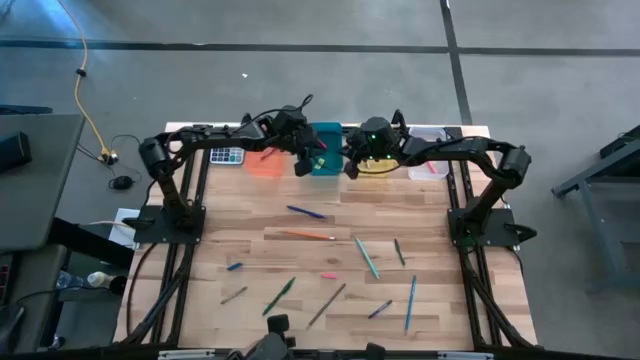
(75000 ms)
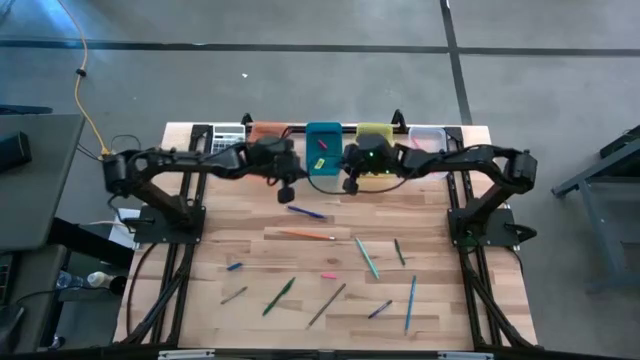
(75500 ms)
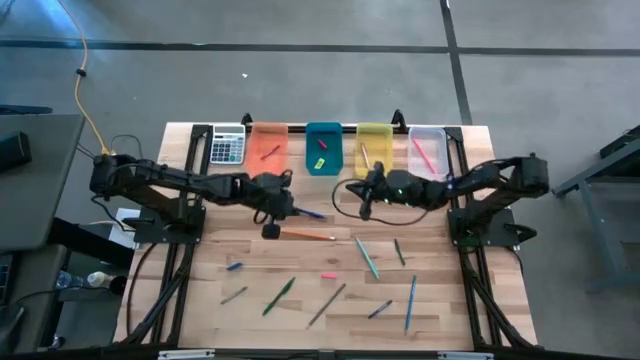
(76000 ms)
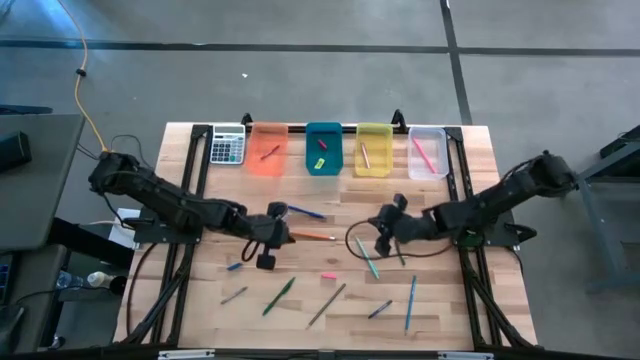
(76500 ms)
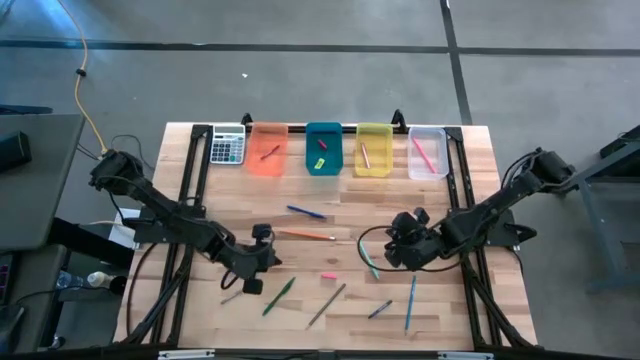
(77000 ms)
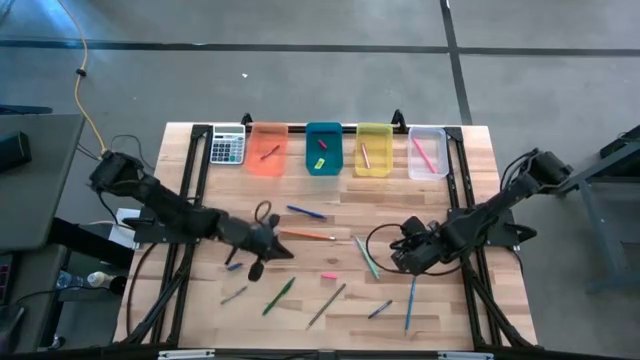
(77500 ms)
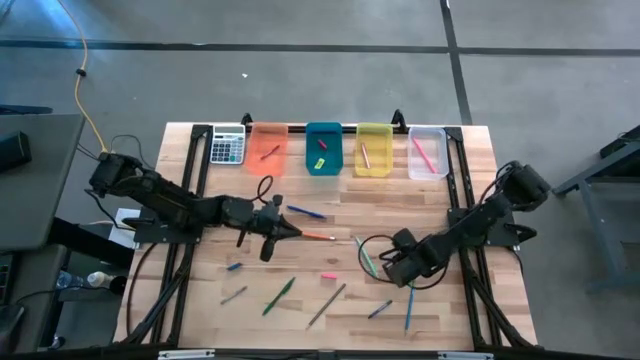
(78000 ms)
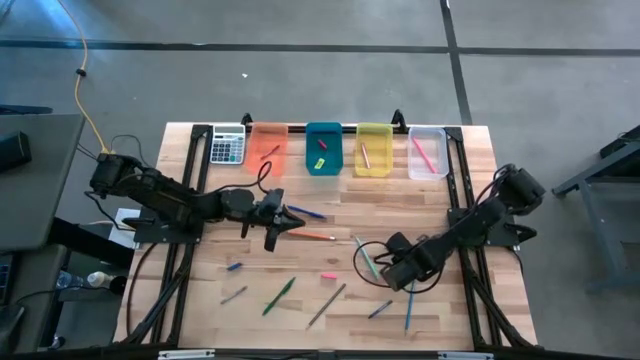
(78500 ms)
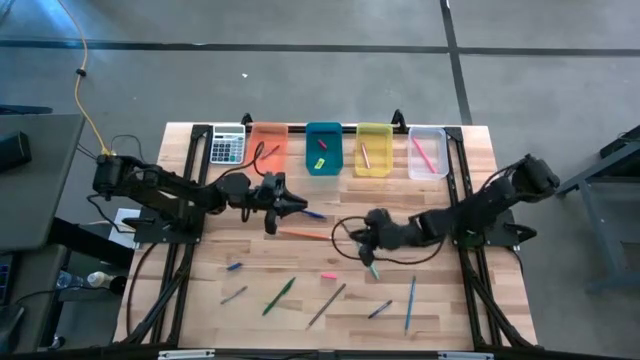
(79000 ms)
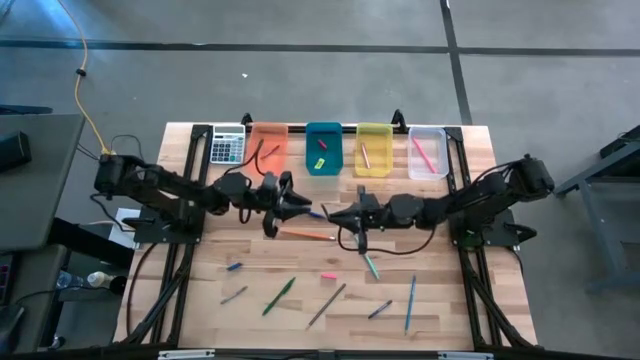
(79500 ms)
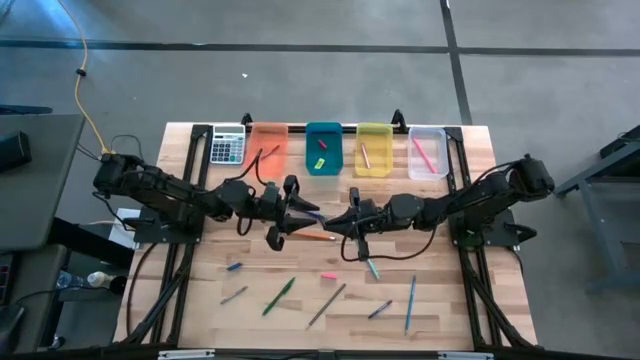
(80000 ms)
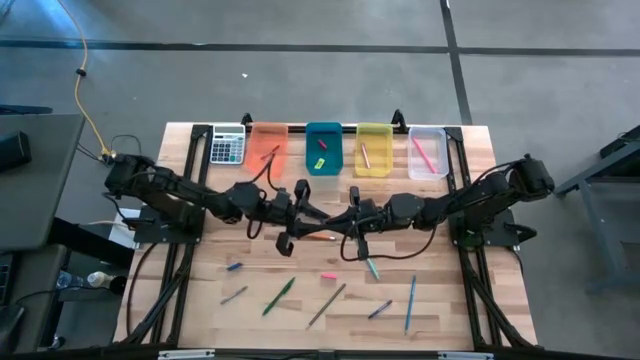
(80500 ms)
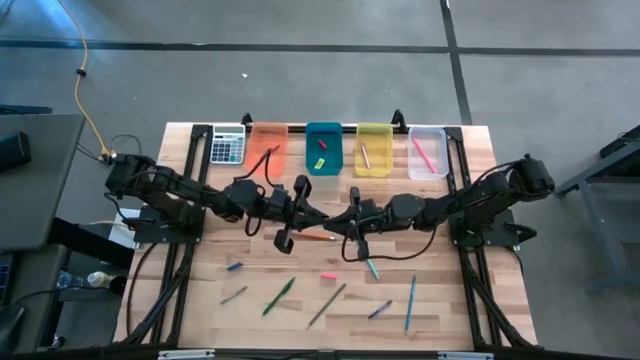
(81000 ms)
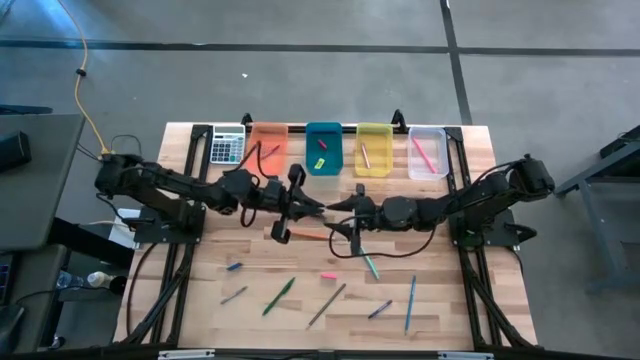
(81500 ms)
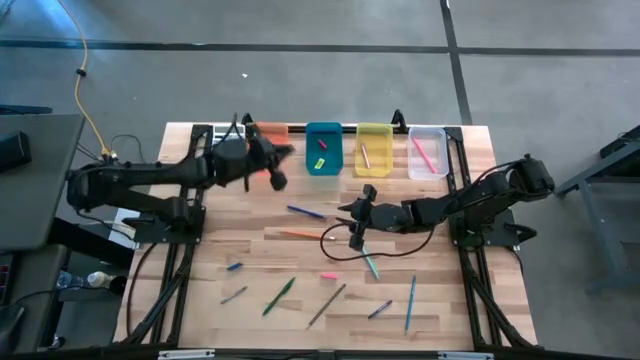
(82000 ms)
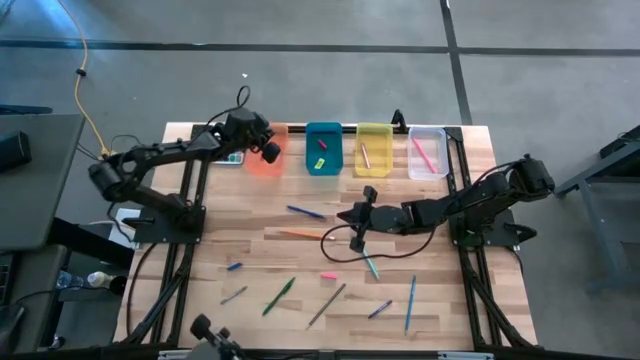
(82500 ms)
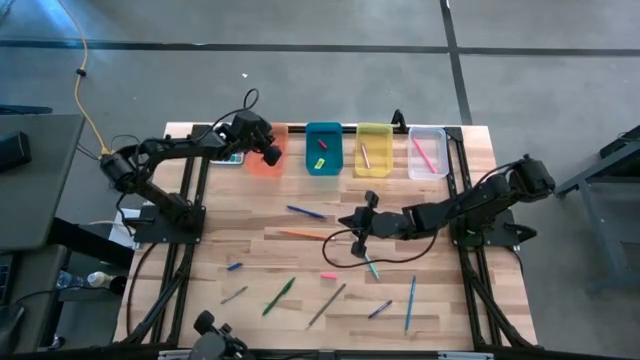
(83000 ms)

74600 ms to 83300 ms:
Task: Sort crayons/erasers/pens/pencils in bins
Put the green crayon into the orange bin

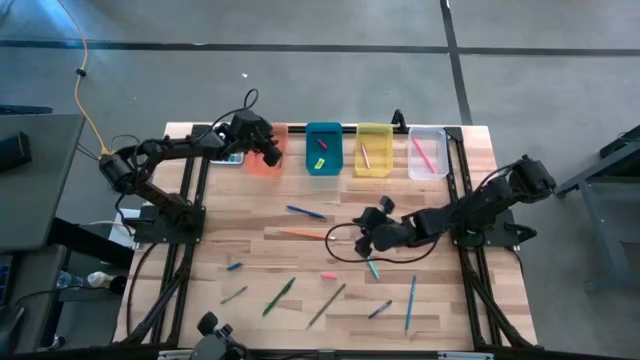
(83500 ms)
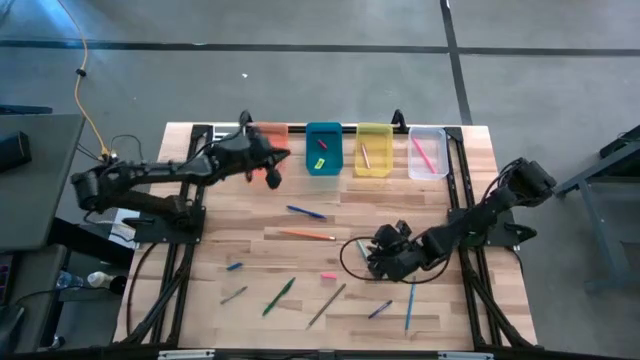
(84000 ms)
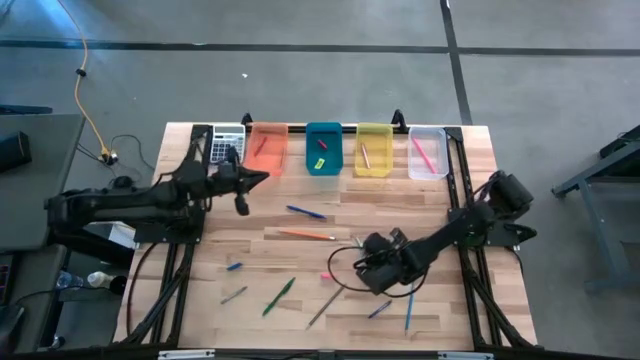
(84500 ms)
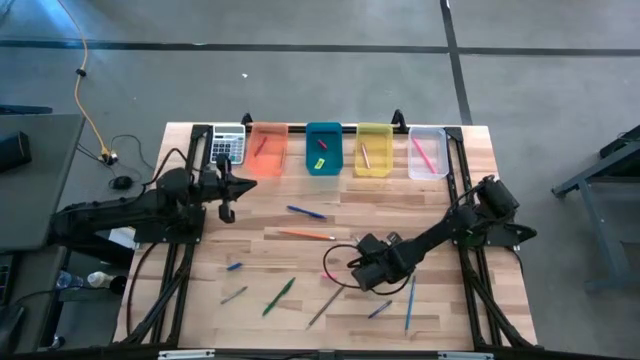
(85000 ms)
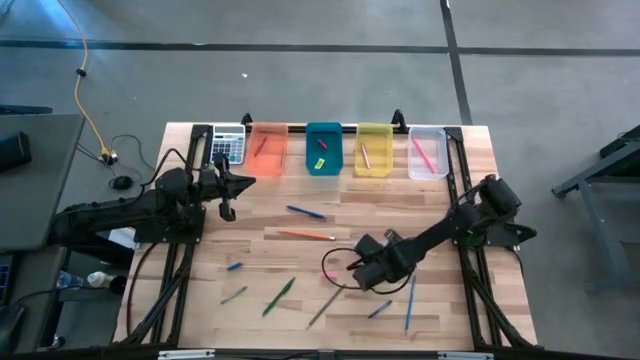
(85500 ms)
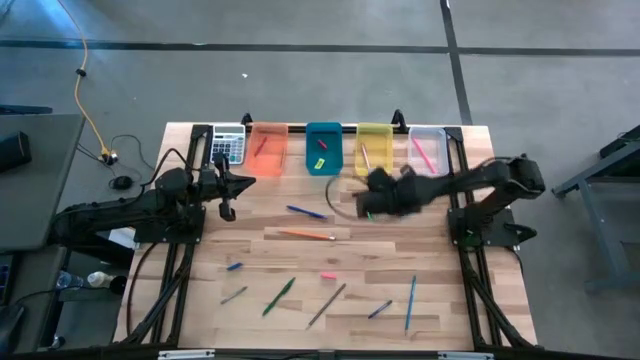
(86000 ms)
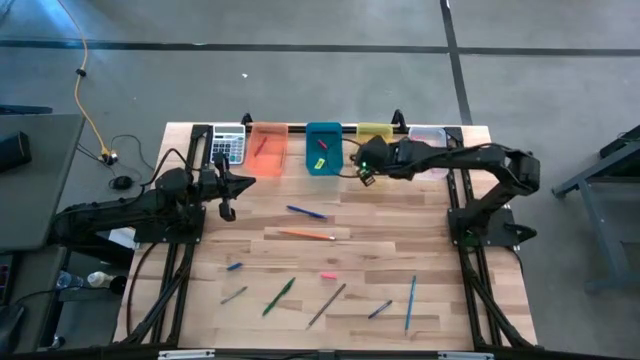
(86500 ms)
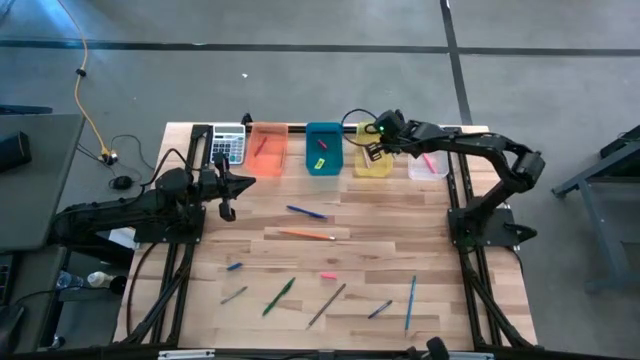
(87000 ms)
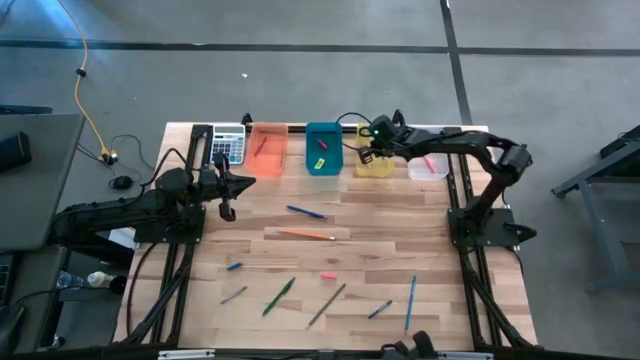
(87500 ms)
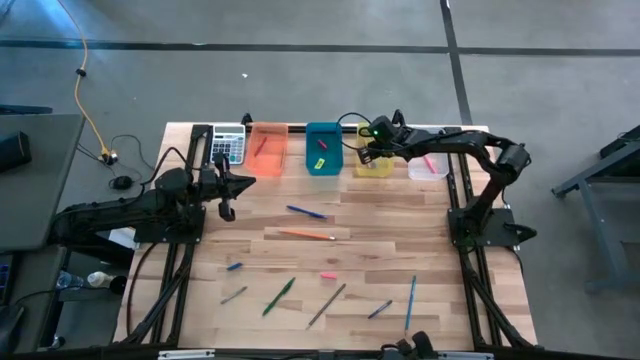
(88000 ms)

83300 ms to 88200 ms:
Put the light blue ballpen into the yellow bin

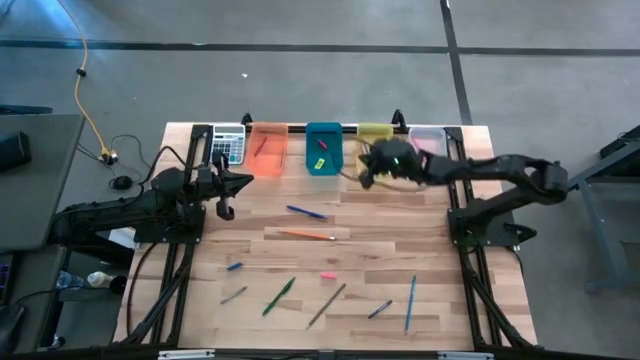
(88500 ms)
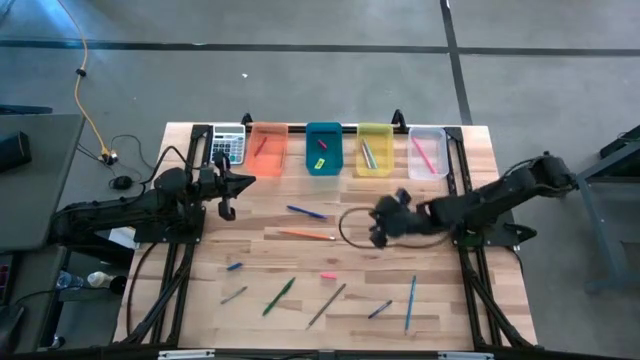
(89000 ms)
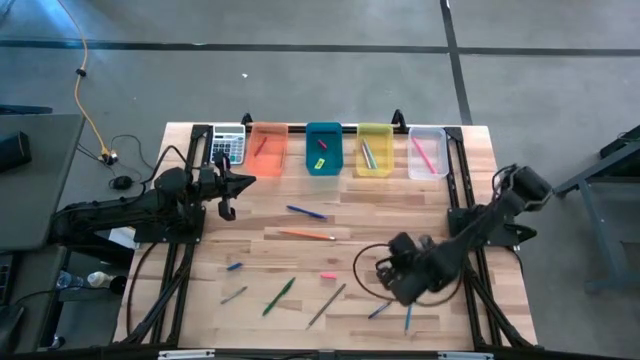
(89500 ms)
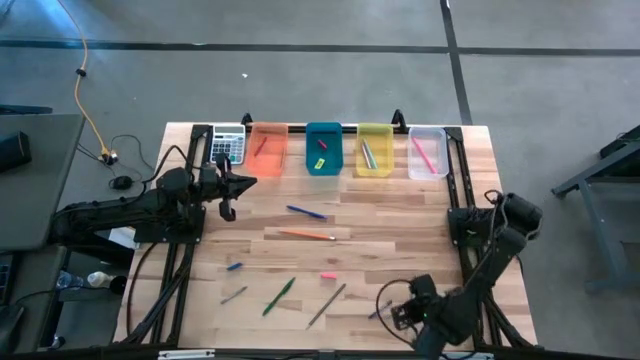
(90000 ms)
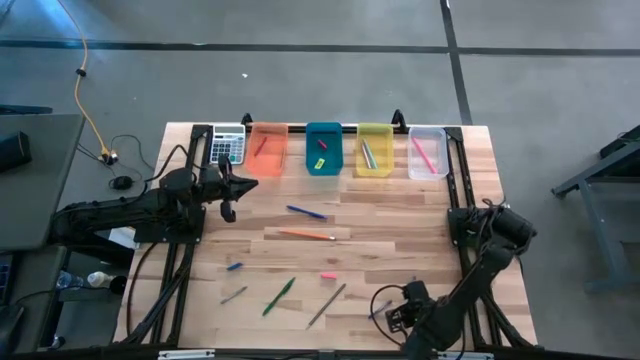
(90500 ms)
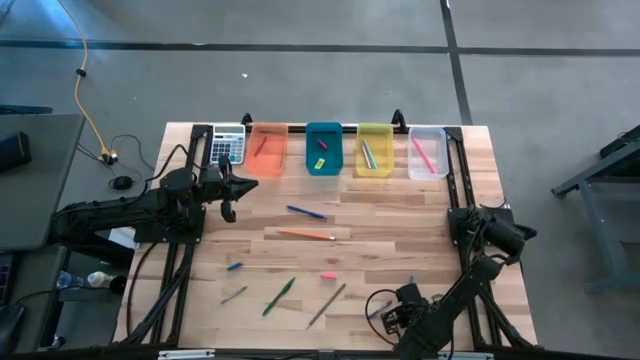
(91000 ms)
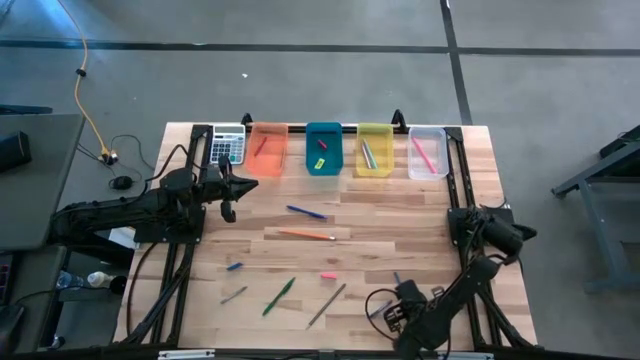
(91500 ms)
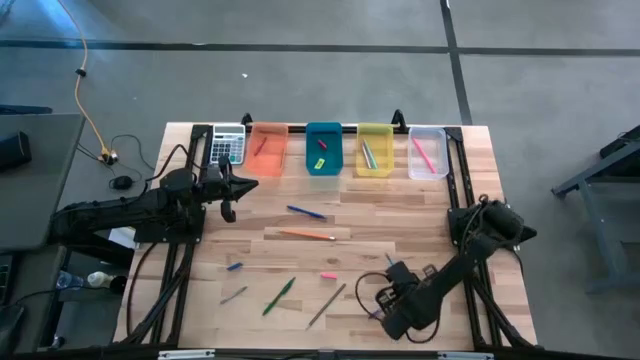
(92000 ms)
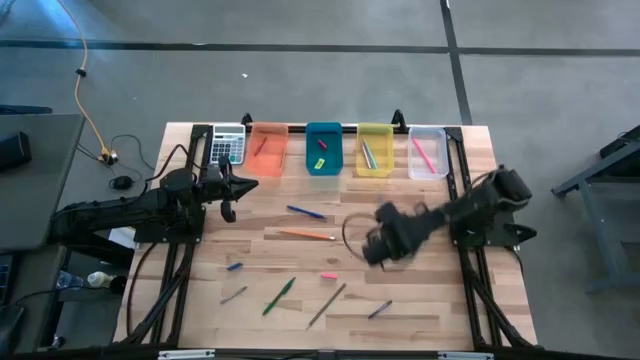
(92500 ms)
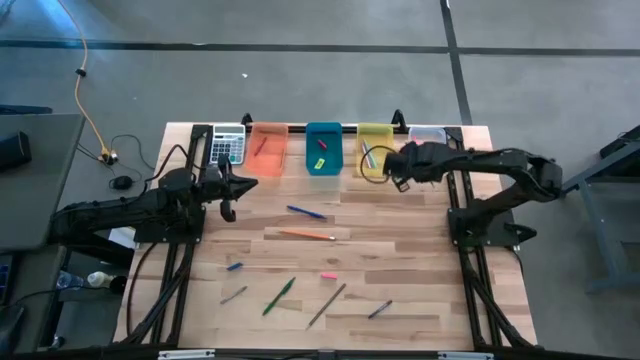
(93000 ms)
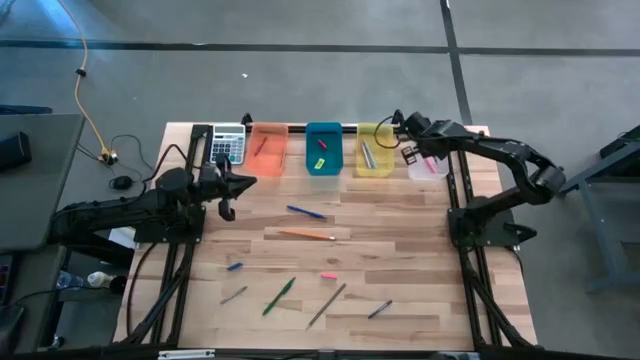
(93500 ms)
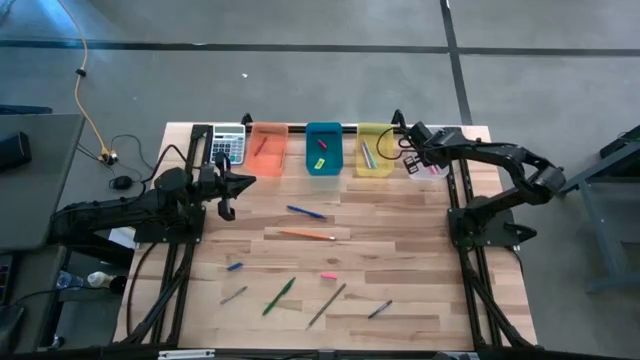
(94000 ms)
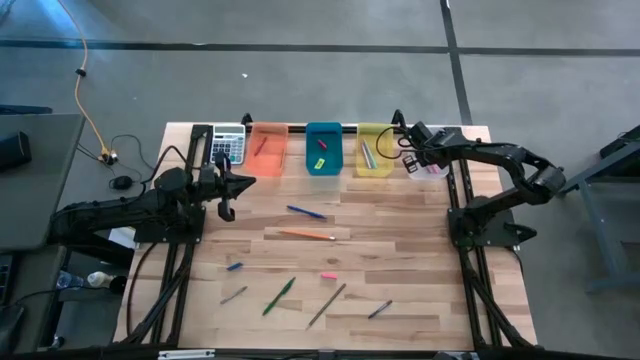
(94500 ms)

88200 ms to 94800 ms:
Put the blue pencil into the transparent bin

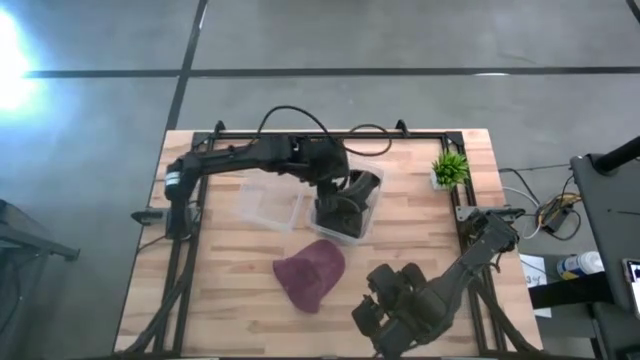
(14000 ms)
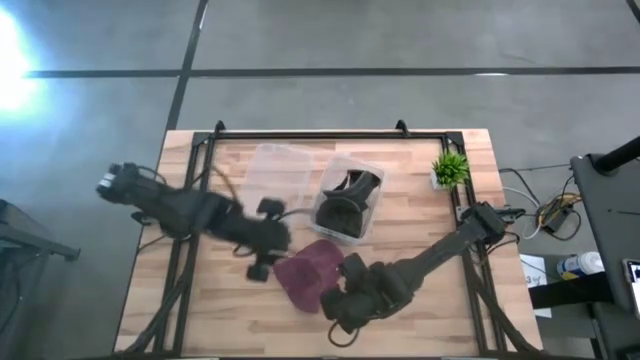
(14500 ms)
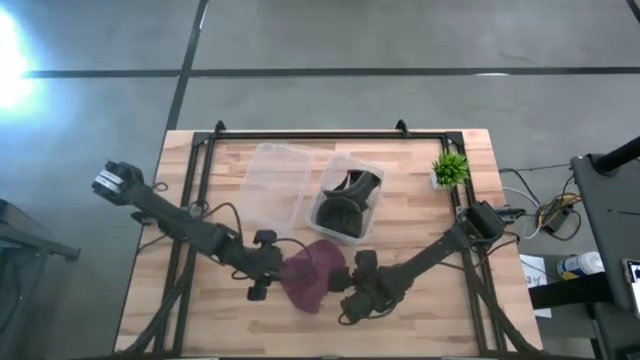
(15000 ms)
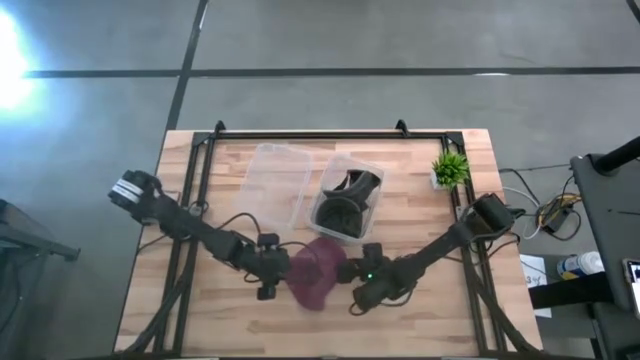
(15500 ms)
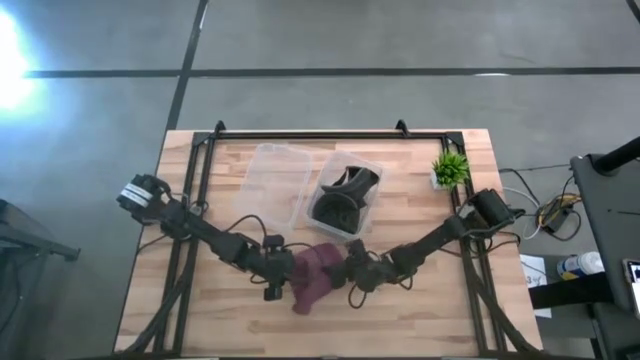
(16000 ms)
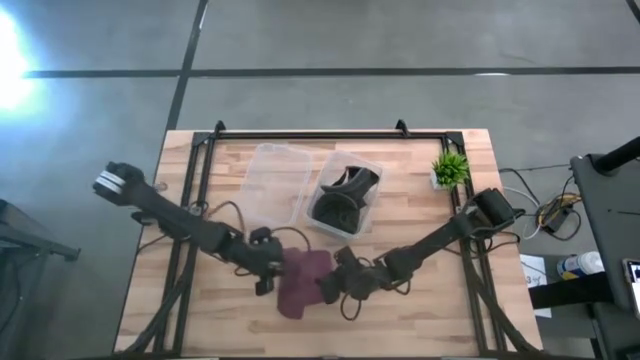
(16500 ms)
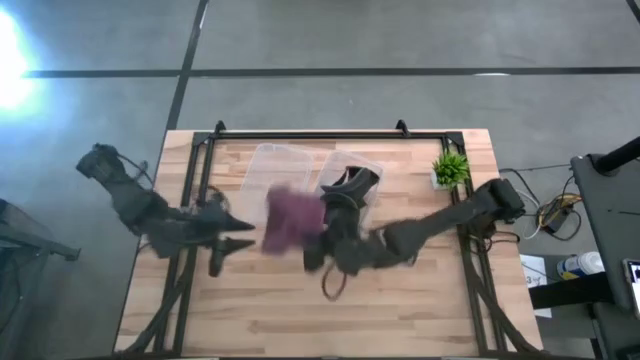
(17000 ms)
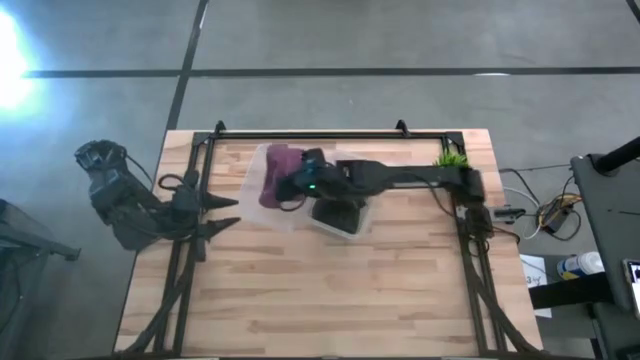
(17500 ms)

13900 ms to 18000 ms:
Task: Pick & Place hat
Put the maroon cap into the left transparent bin
